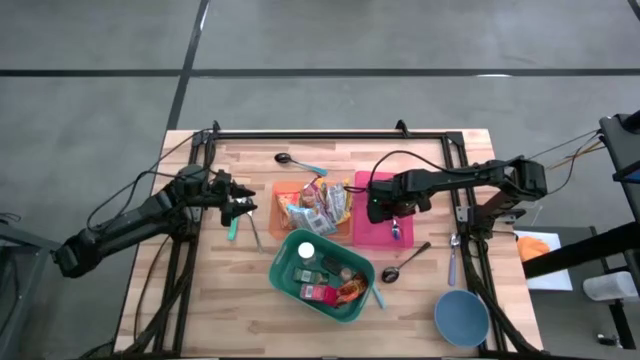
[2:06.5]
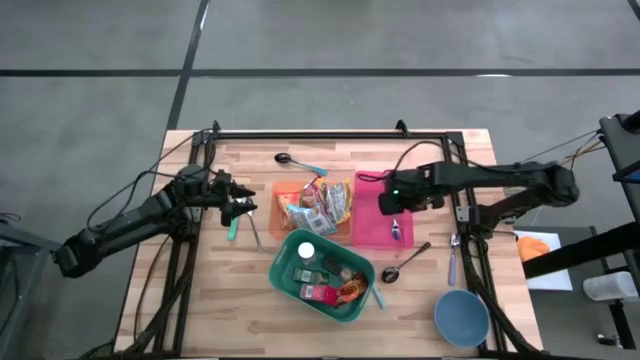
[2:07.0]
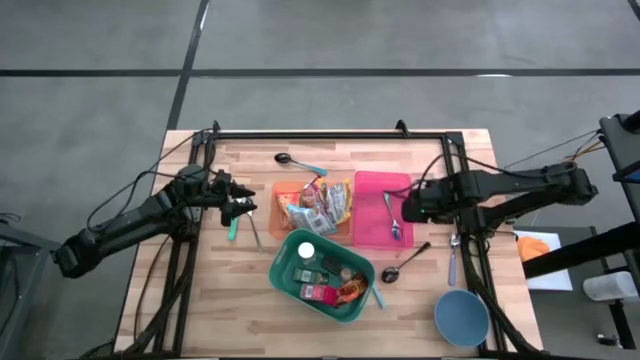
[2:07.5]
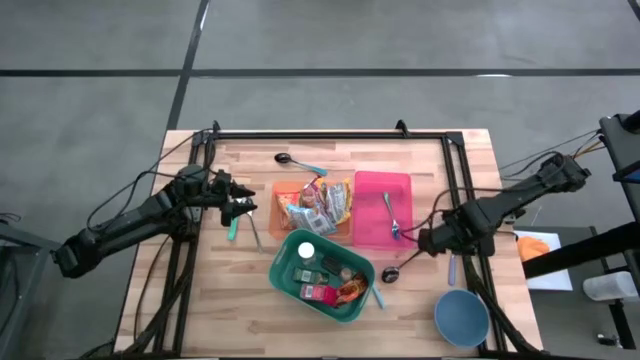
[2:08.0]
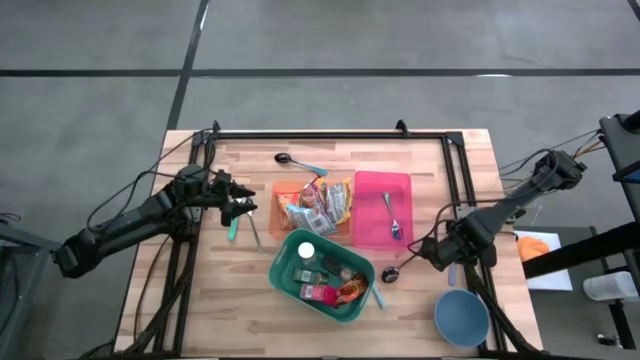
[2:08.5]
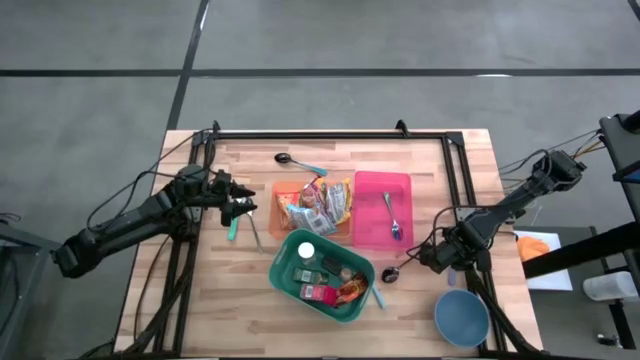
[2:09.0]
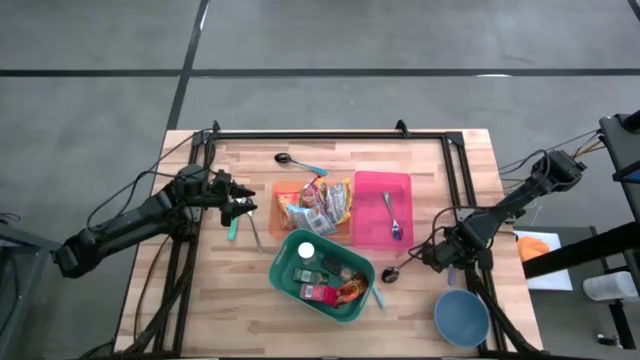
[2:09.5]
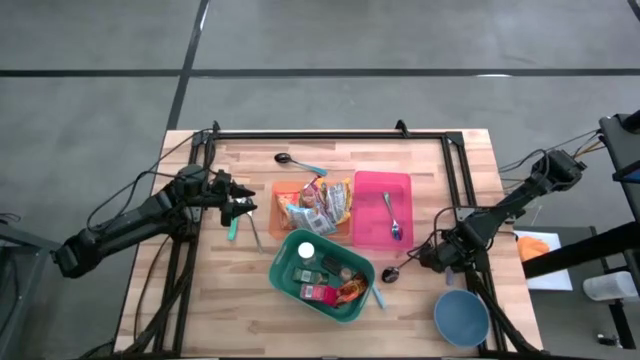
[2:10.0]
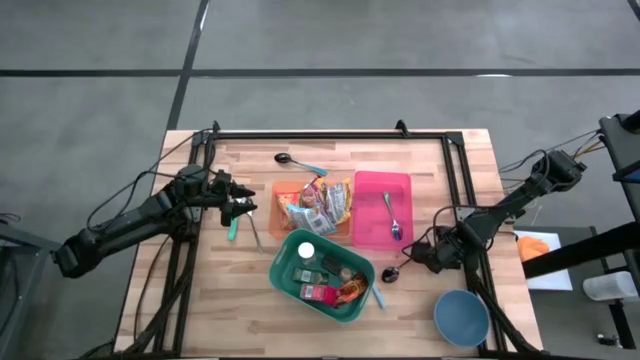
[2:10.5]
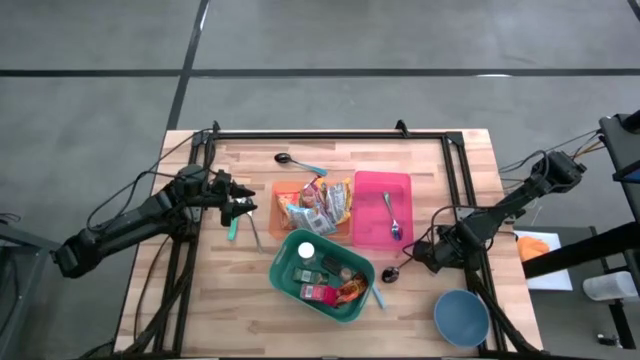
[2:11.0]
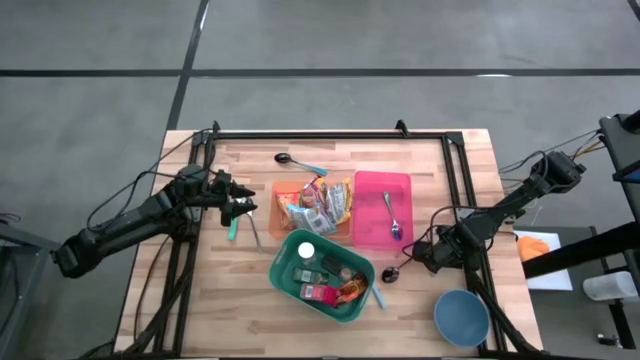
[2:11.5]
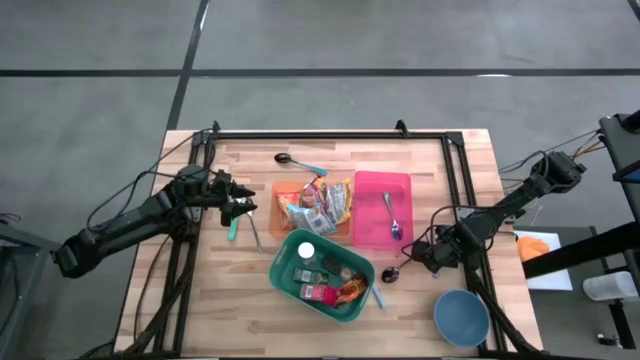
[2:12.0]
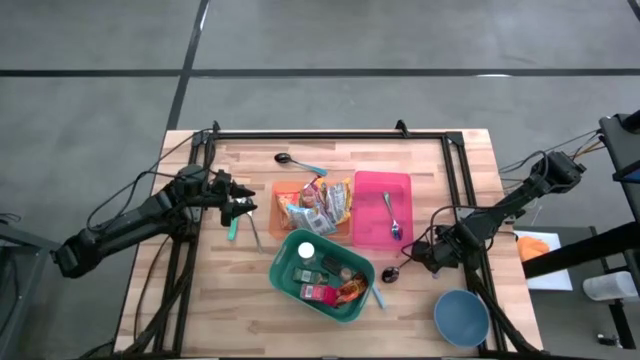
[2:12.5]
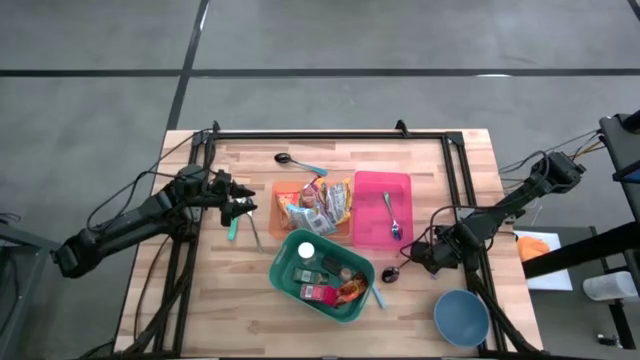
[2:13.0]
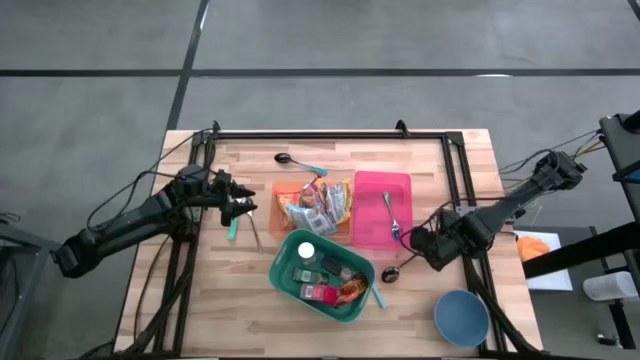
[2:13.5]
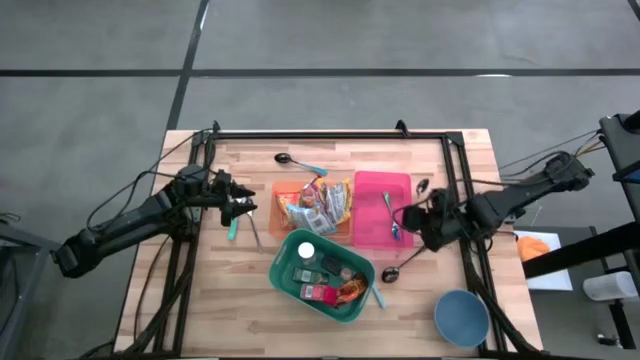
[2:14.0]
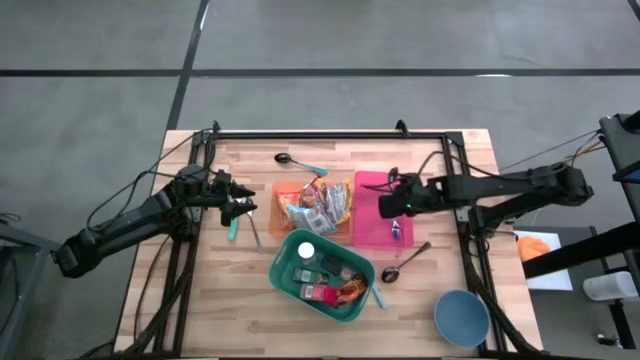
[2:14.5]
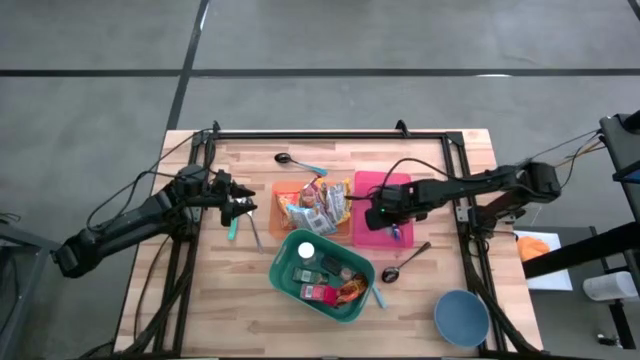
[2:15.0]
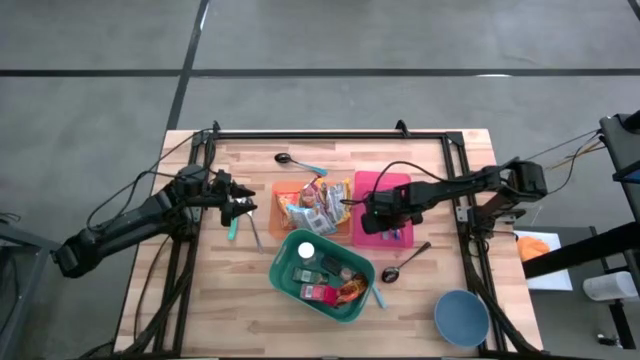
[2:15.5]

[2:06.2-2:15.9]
Put the light purple spoon into the pink bin

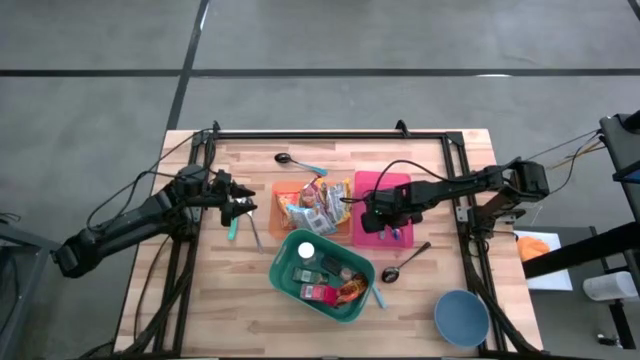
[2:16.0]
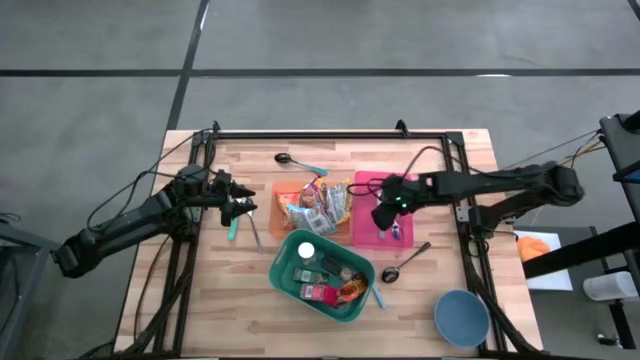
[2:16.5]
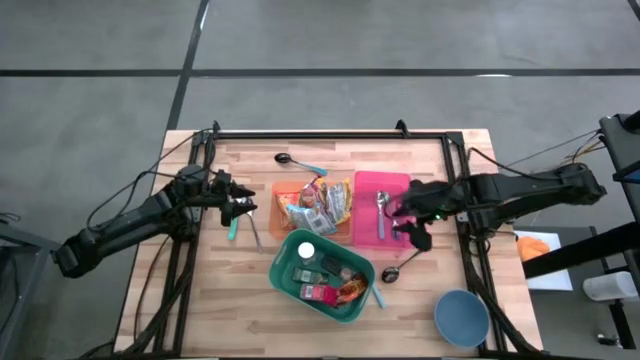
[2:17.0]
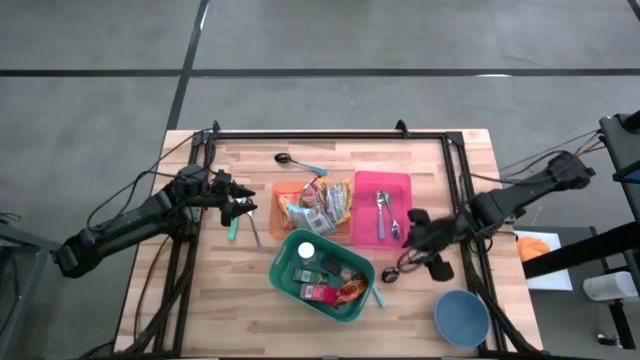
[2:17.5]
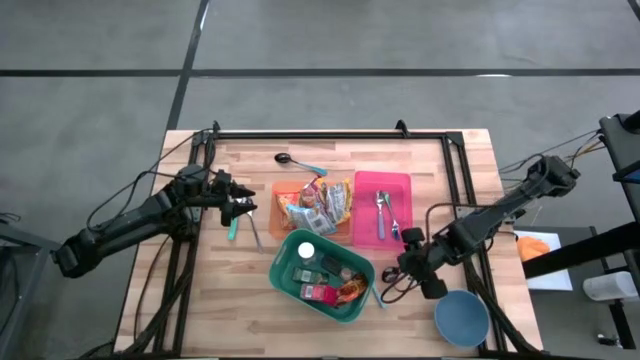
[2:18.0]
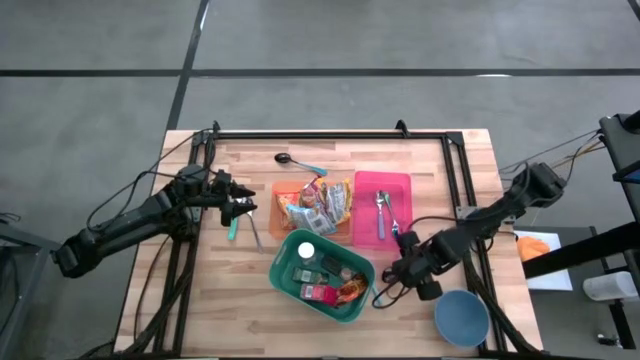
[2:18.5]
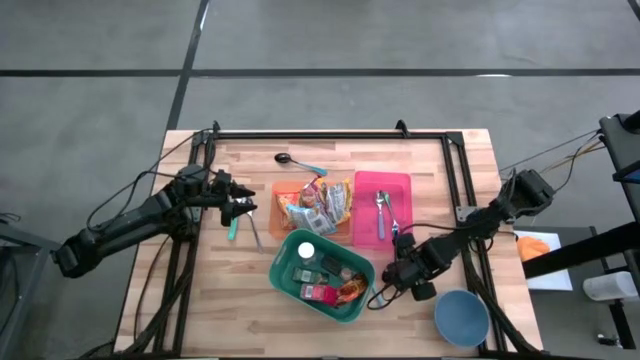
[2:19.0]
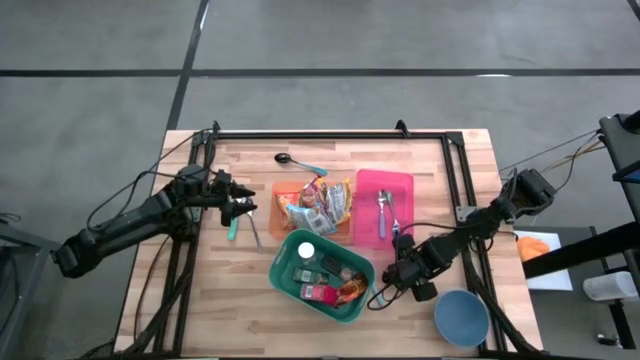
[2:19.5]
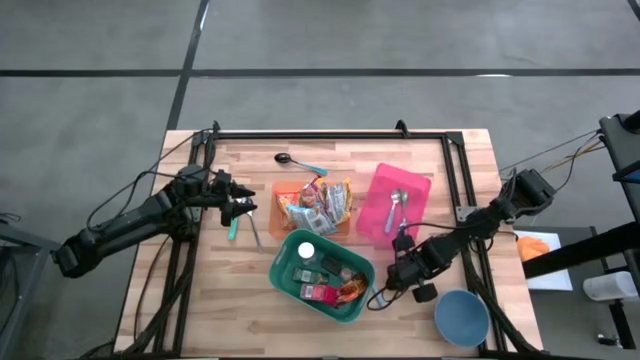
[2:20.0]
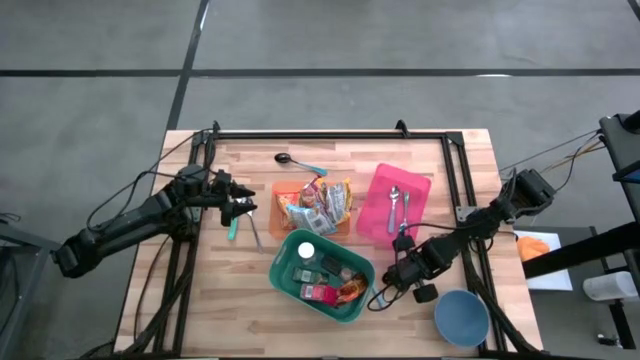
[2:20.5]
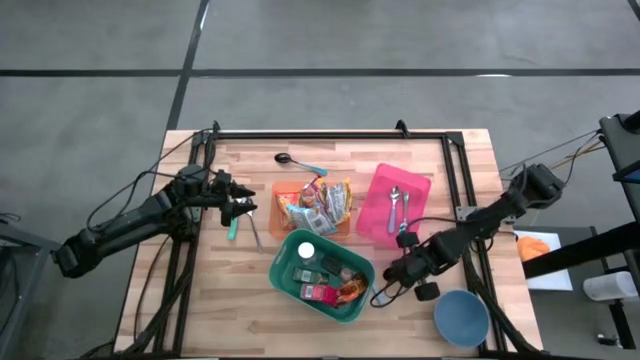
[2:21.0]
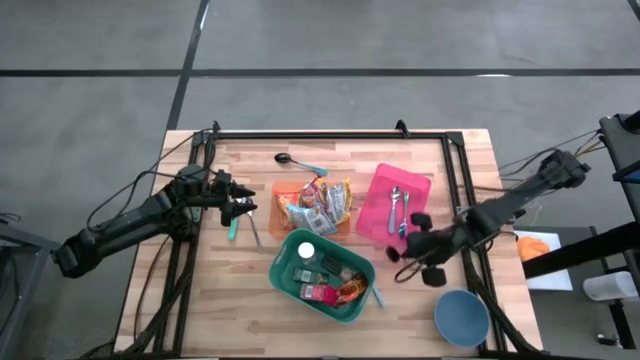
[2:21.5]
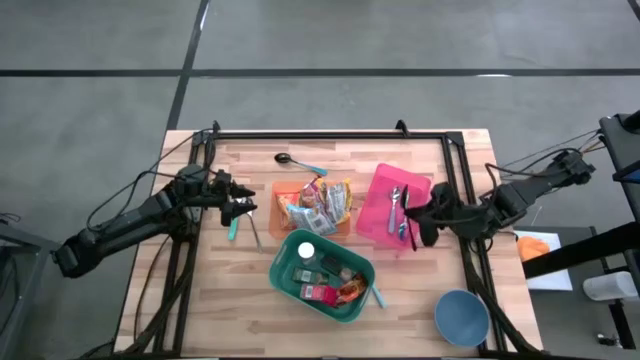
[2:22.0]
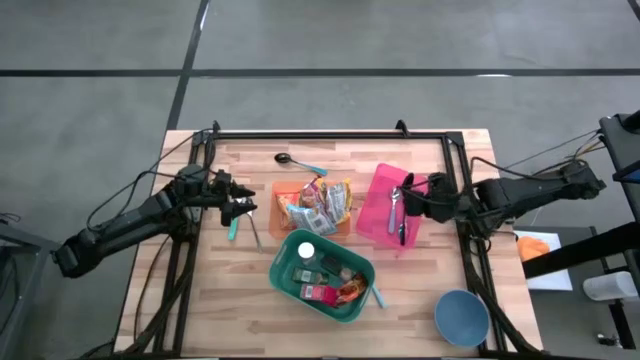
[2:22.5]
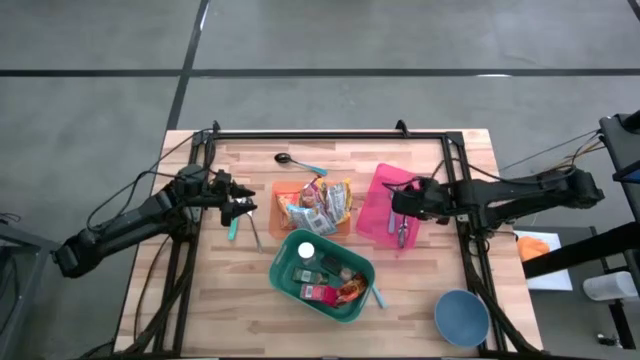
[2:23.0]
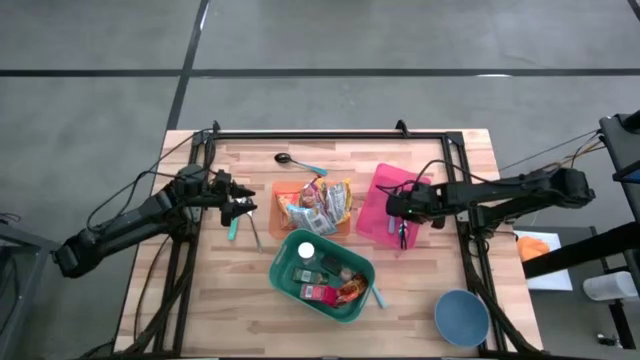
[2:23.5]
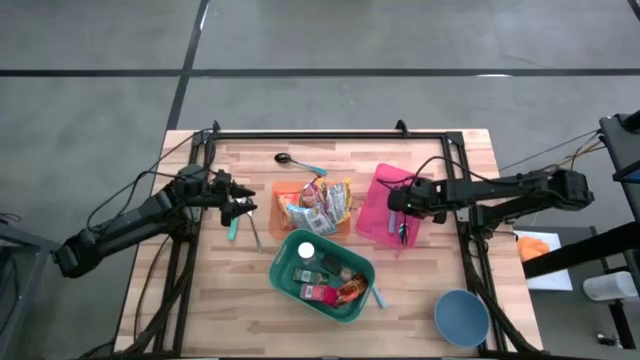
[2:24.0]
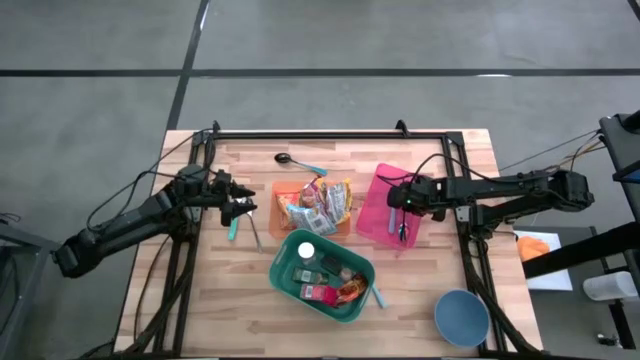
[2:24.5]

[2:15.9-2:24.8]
Put the black spoon into the pink bin
